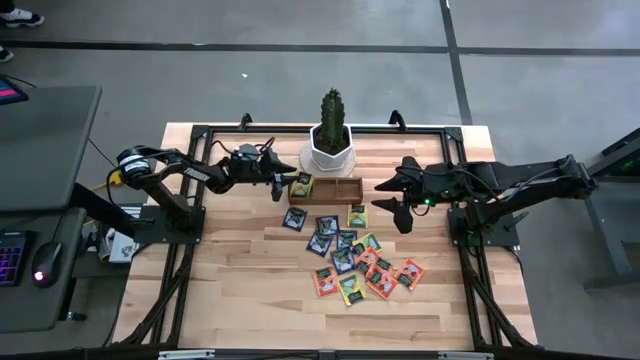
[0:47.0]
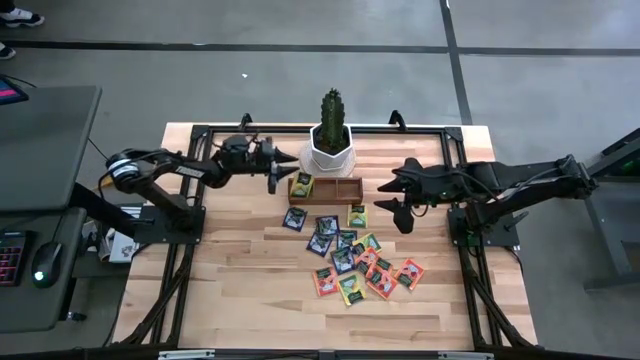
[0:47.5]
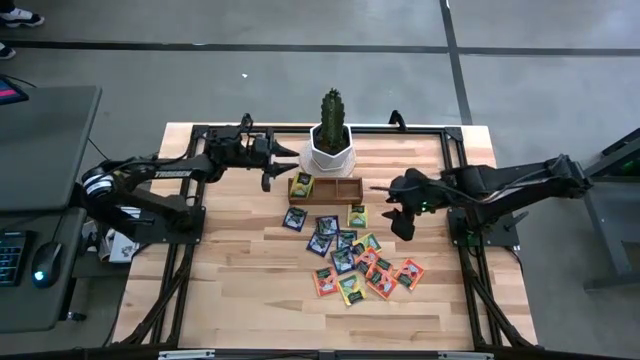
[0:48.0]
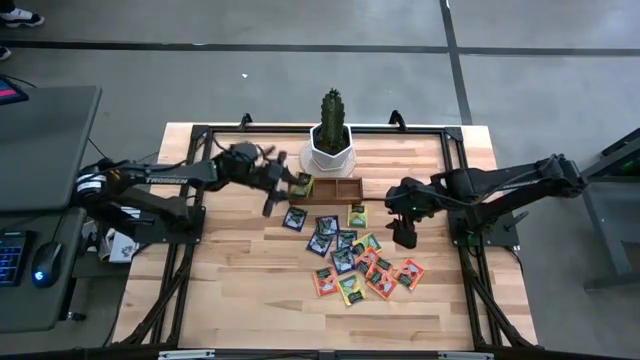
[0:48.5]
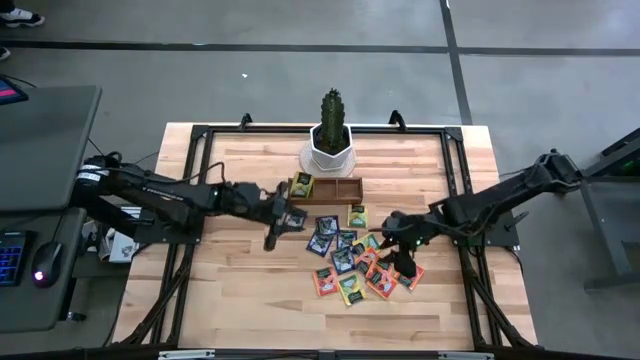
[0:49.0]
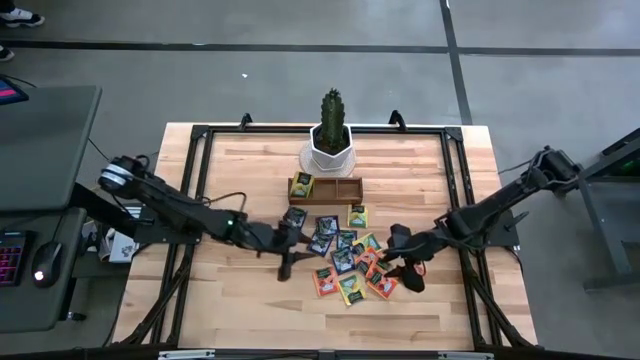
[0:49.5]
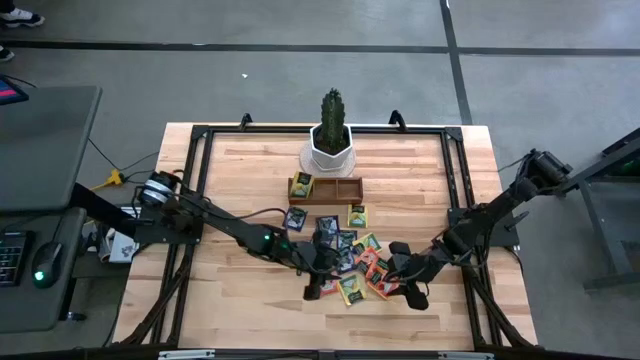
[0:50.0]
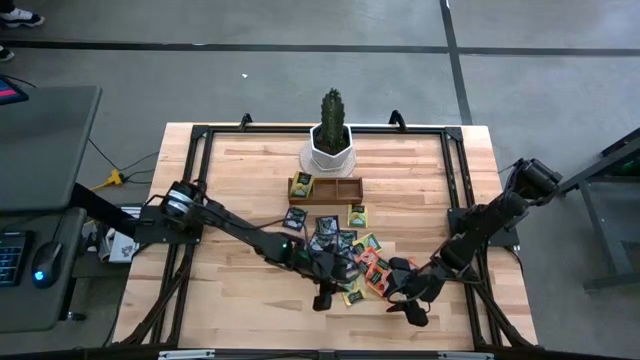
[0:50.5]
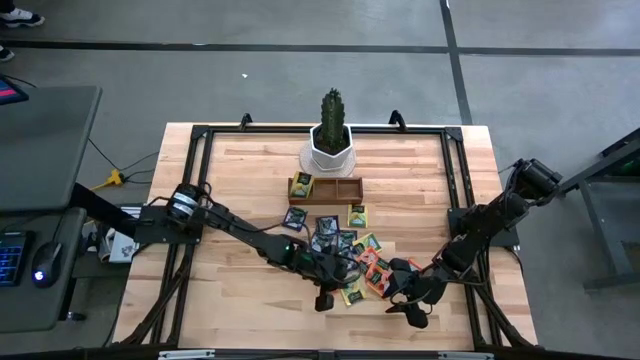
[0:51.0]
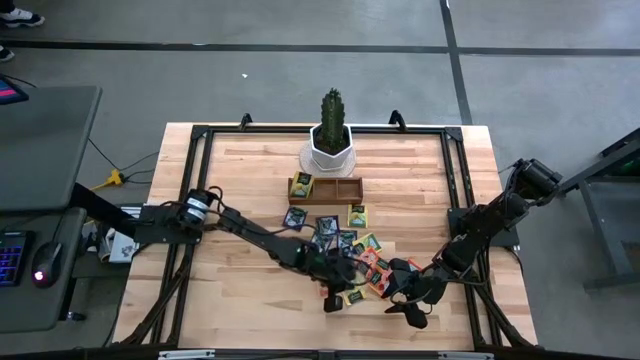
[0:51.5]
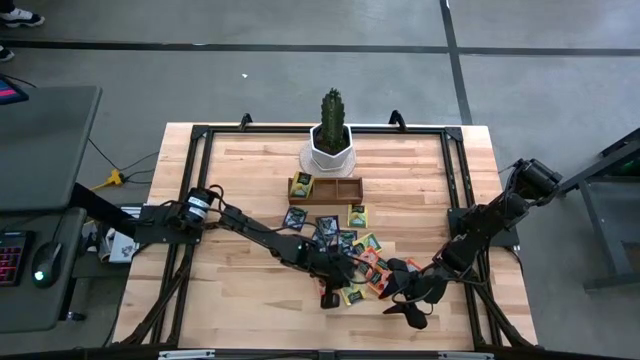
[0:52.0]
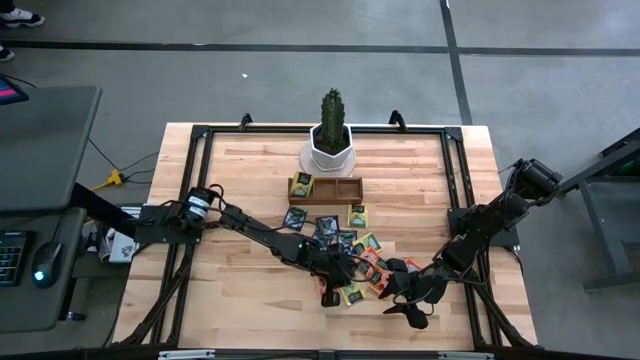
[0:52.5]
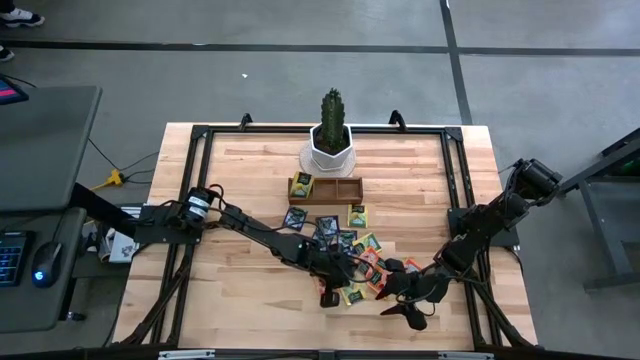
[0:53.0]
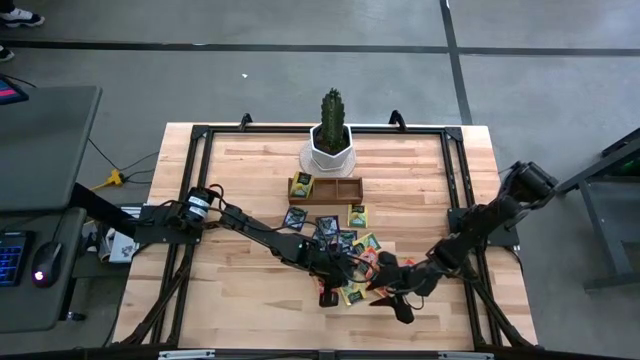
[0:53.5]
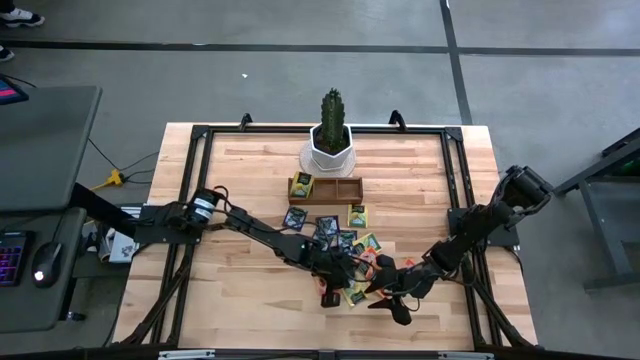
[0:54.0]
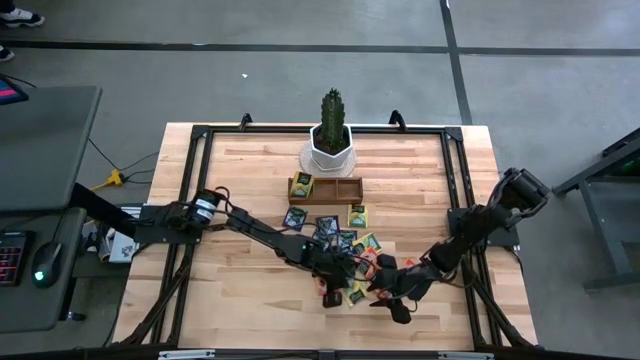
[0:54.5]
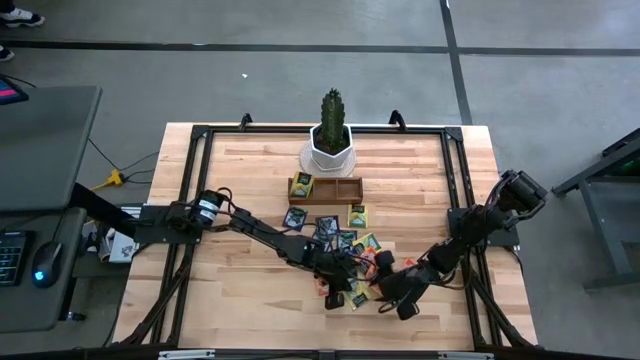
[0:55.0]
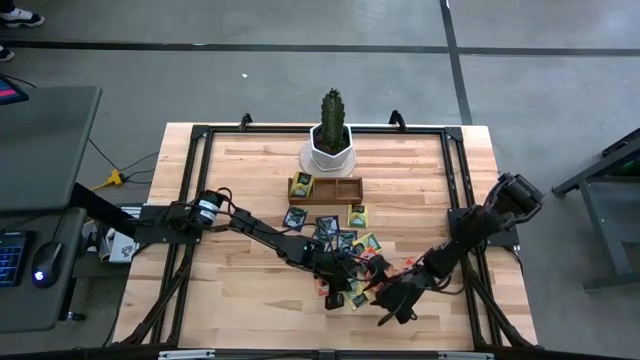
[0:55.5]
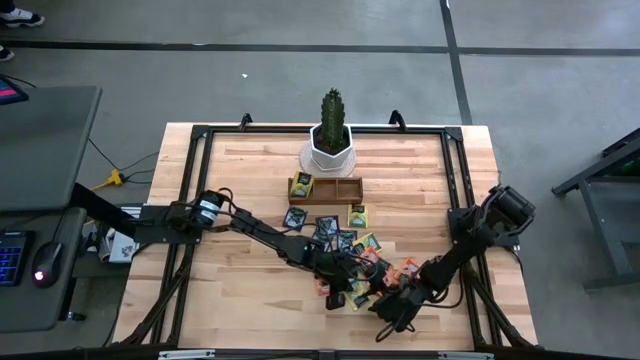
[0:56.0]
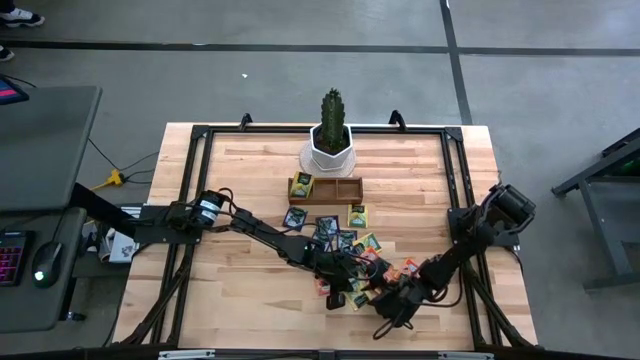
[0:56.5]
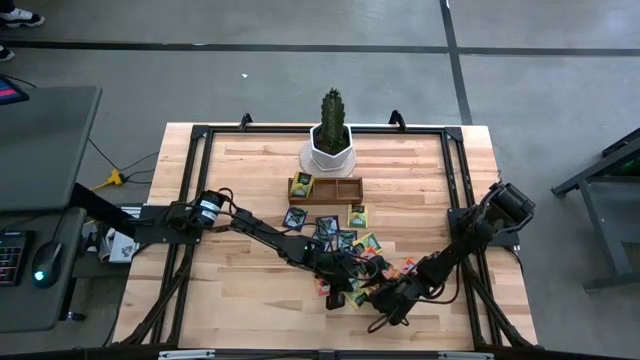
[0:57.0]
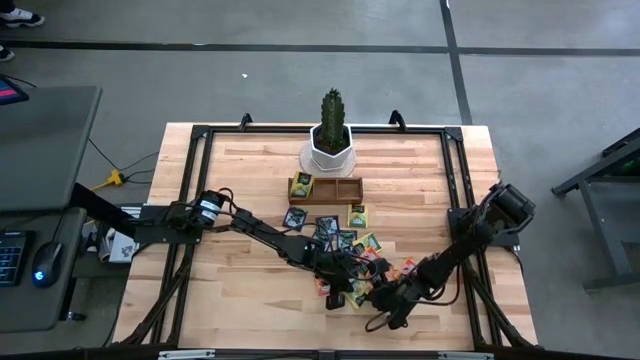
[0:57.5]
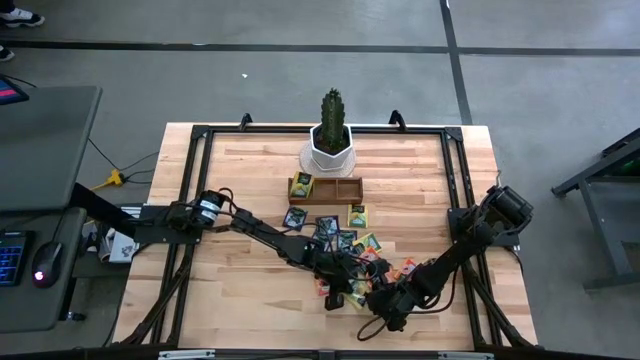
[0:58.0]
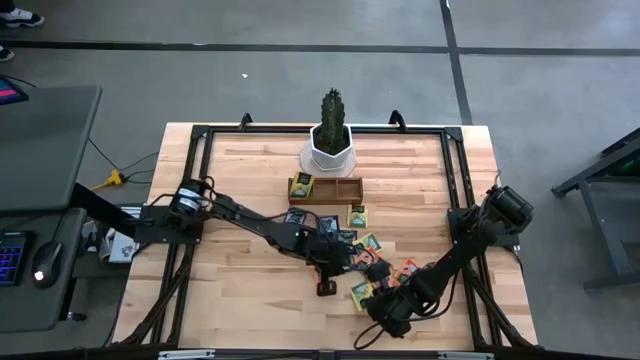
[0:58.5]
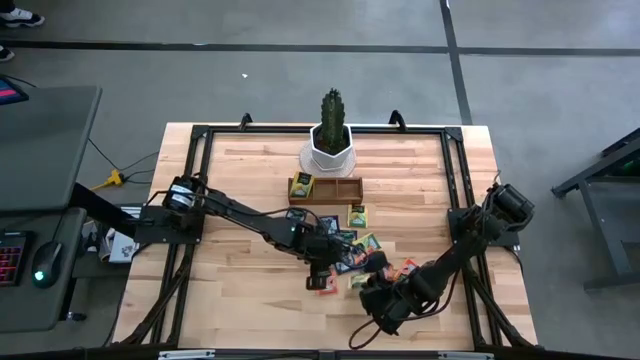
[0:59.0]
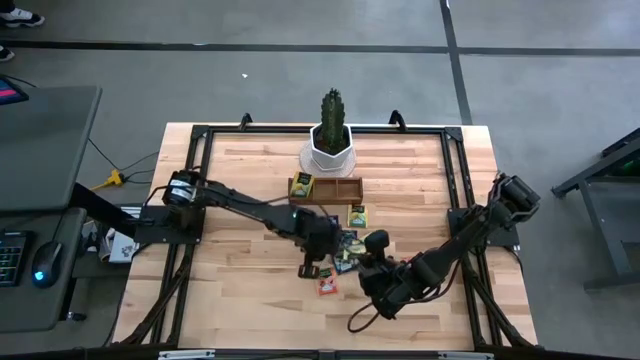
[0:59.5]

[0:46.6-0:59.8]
Task: Pick & Place Tea
Put the yellow tea bag into the left section of the wooden organizer

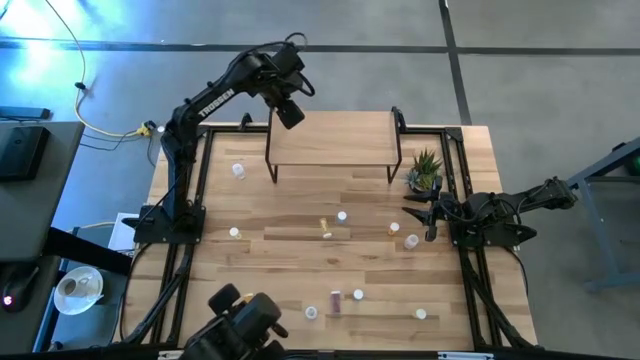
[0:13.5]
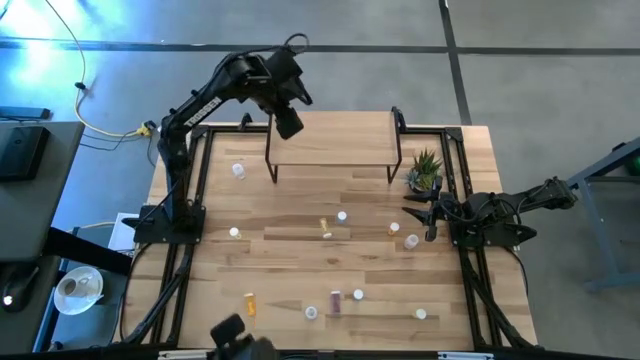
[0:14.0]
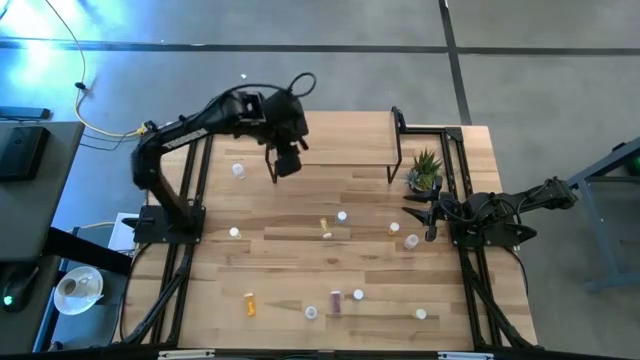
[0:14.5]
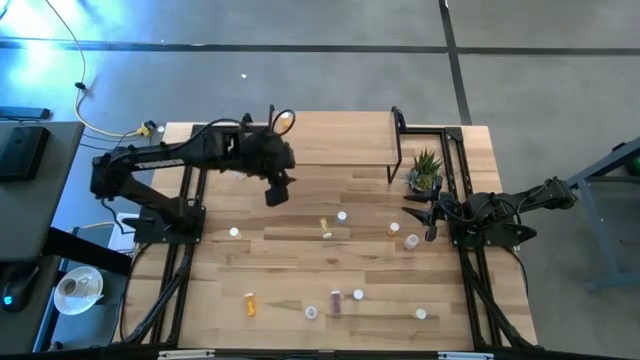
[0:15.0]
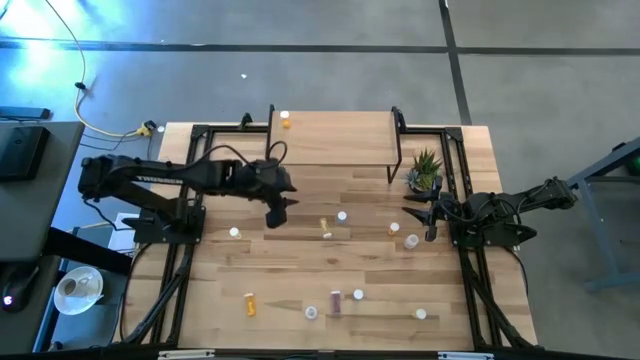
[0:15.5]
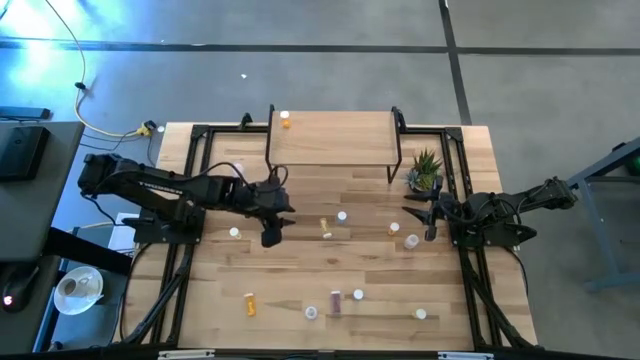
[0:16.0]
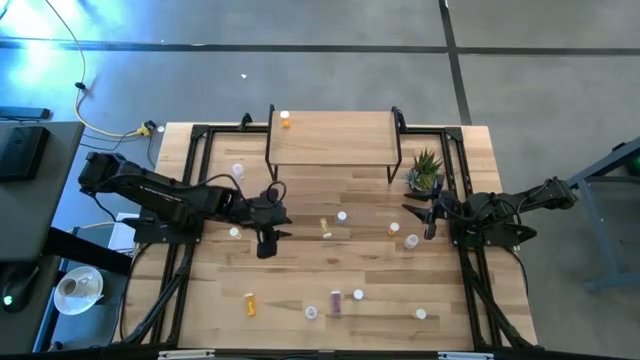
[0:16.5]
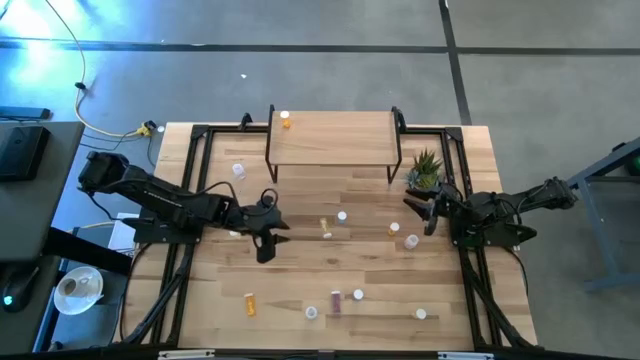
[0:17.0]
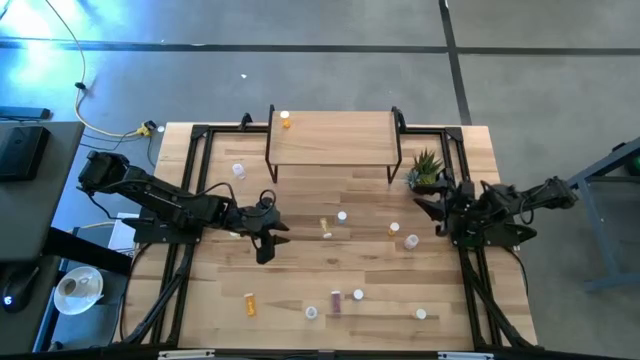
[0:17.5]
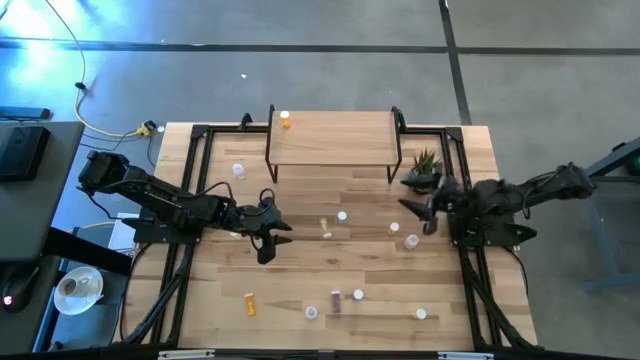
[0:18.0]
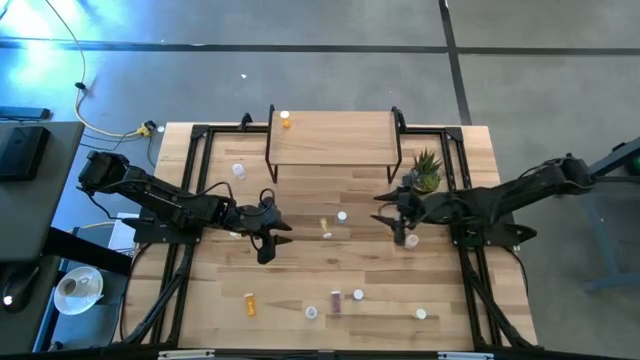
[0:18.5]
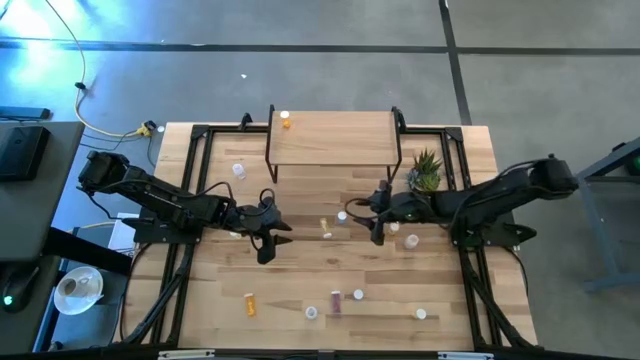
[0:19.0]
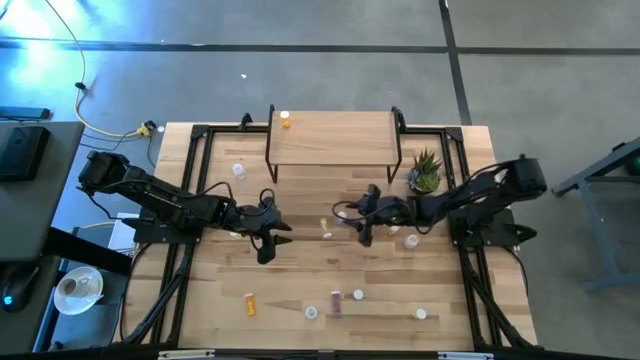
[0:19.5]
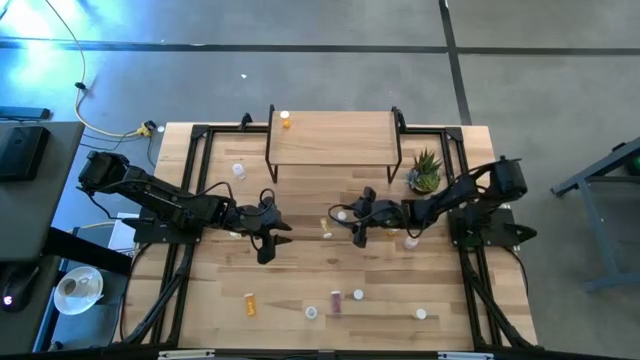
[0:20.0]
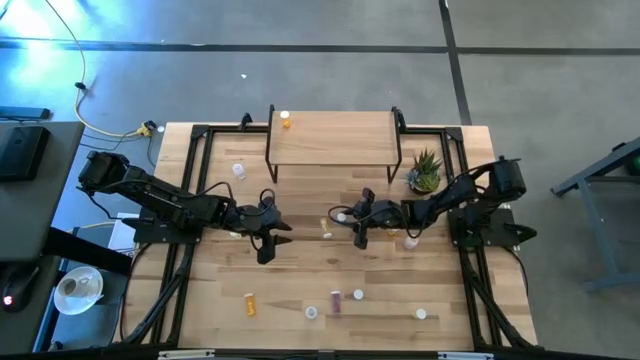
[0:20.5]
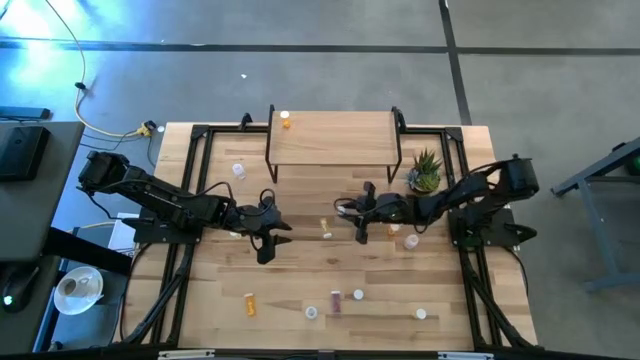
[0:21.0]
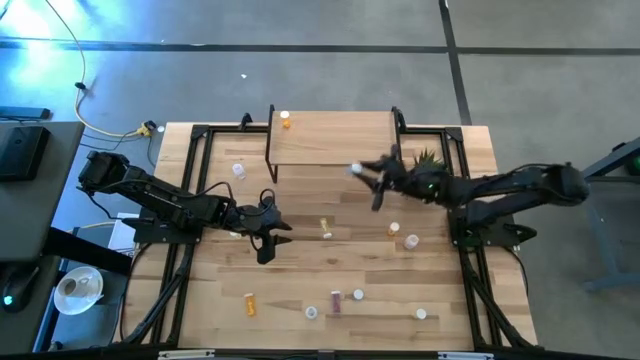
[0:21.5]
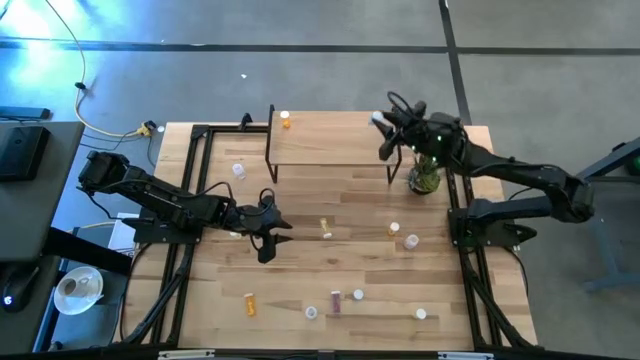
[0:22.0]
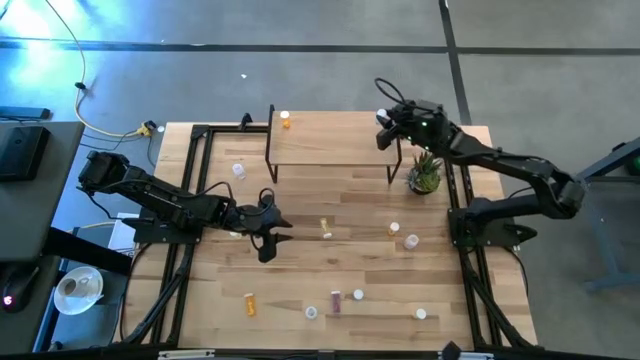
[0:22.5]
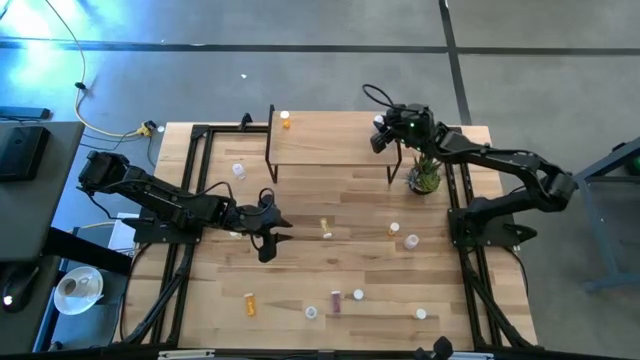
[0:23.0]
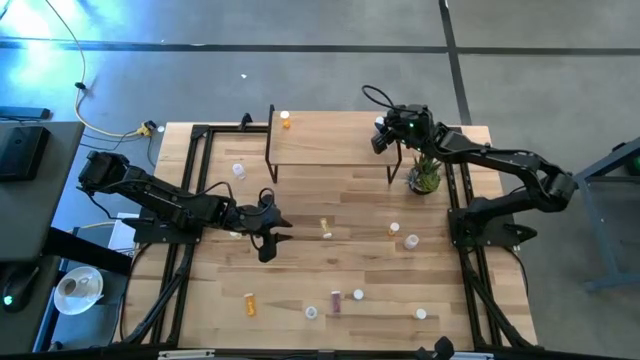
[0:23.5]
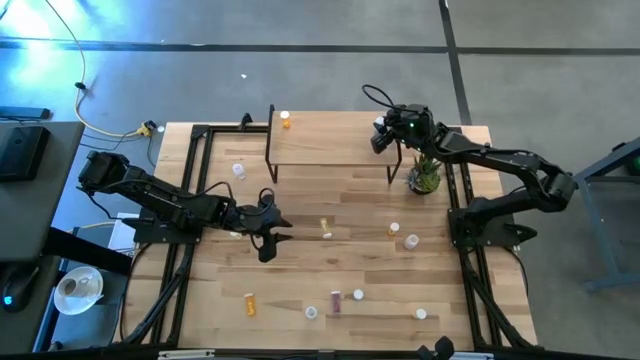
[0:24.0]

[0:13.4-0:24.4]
Task: Pick and place medicine bottles onto shelf by color
Put the top blue pill bottle on the shelf
